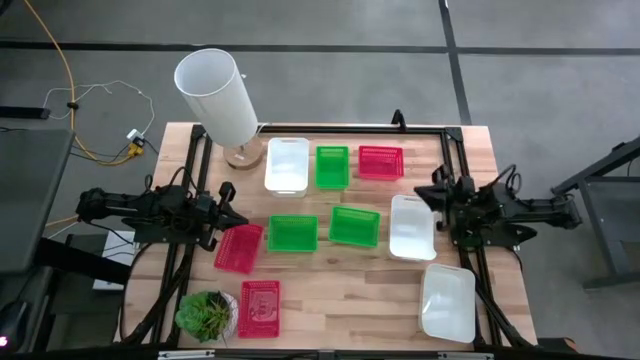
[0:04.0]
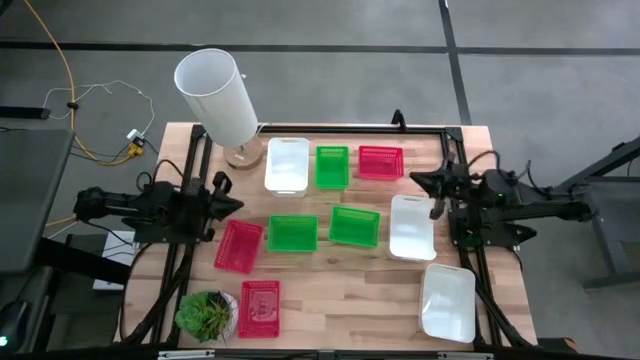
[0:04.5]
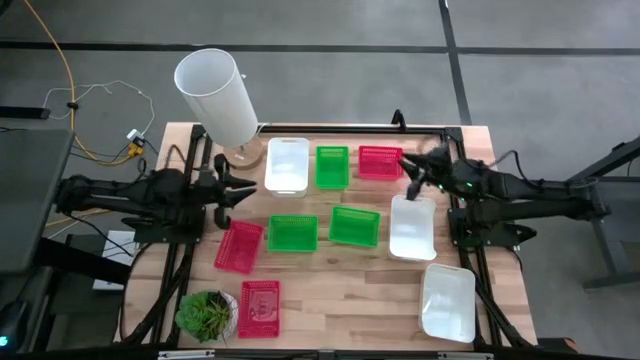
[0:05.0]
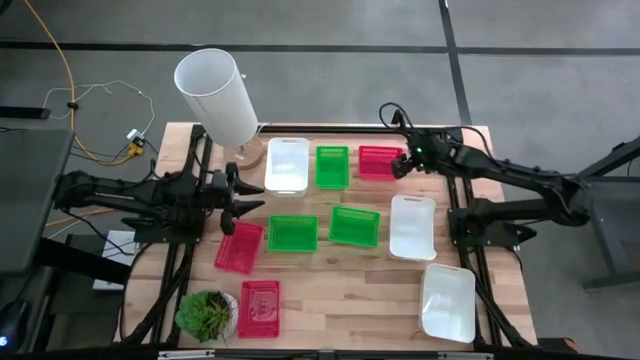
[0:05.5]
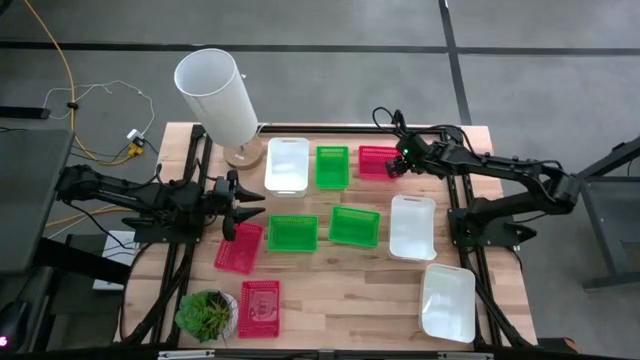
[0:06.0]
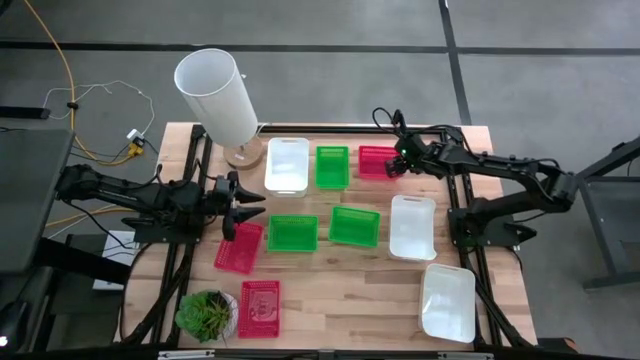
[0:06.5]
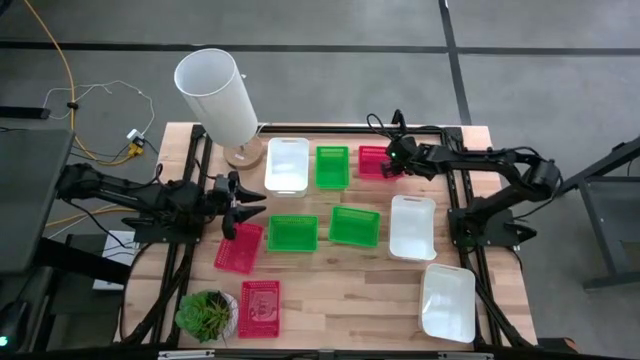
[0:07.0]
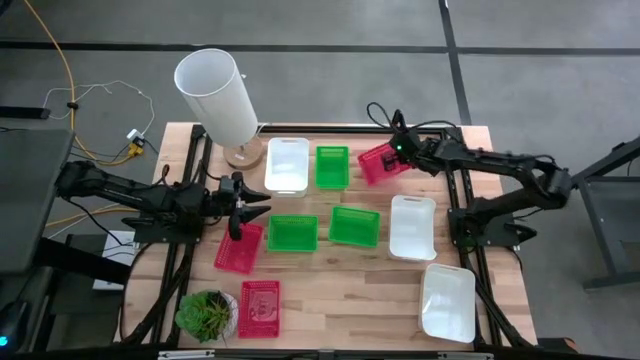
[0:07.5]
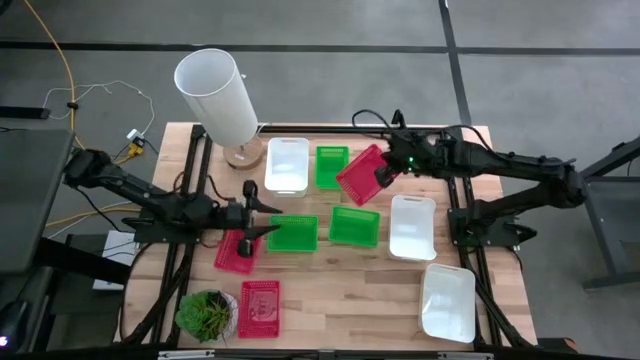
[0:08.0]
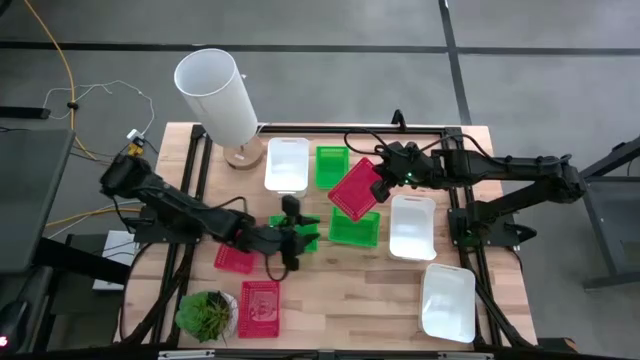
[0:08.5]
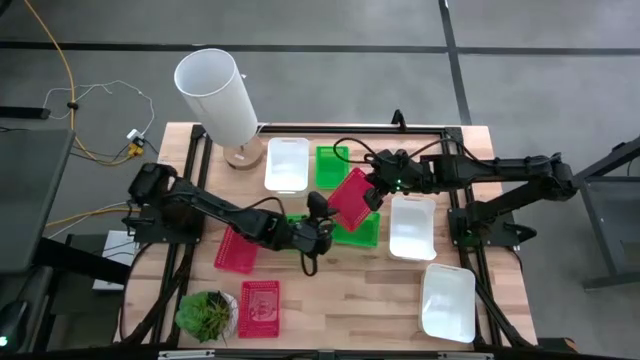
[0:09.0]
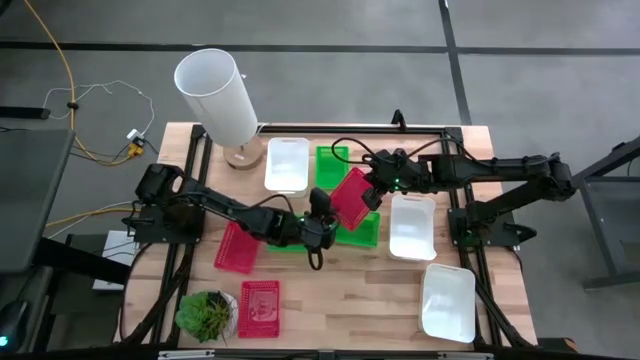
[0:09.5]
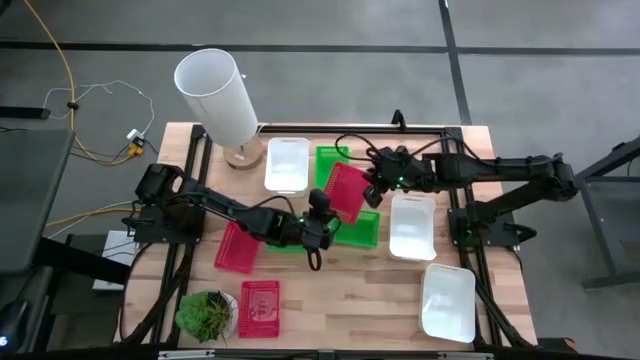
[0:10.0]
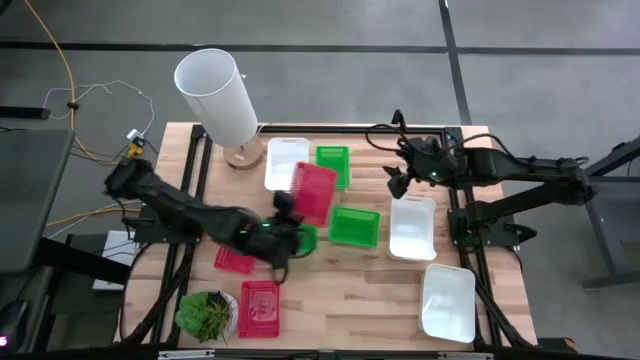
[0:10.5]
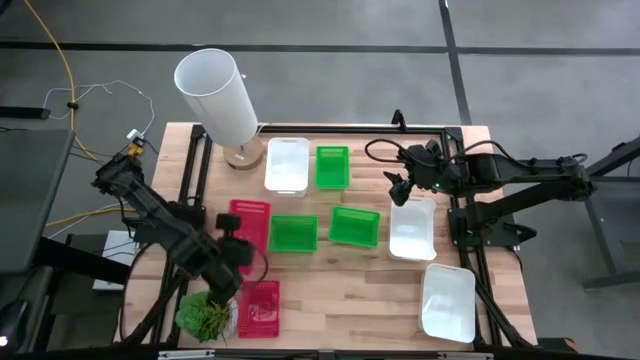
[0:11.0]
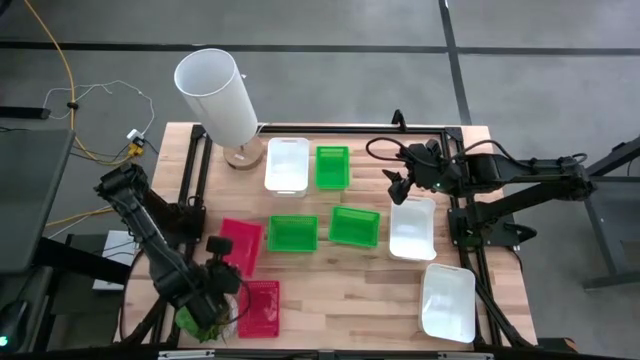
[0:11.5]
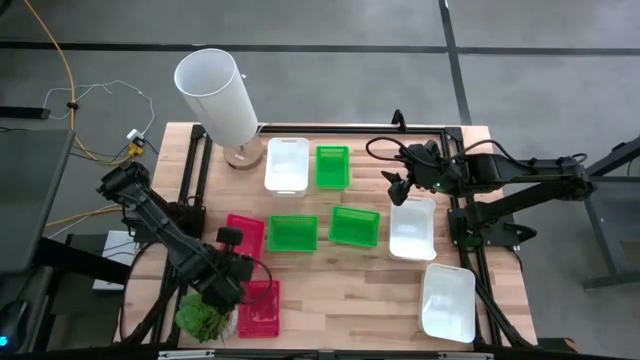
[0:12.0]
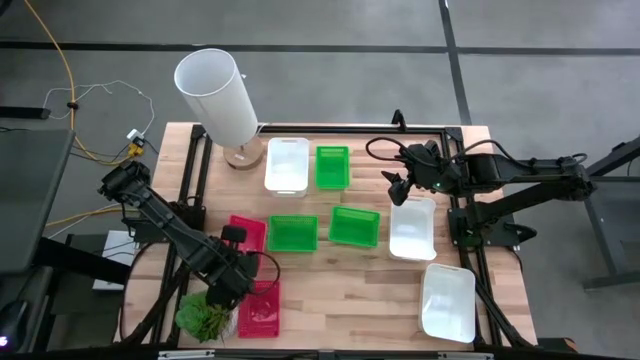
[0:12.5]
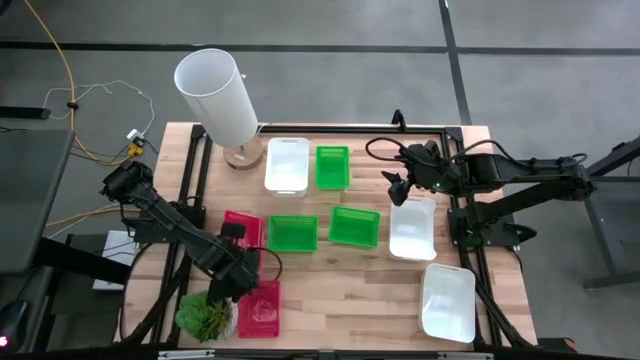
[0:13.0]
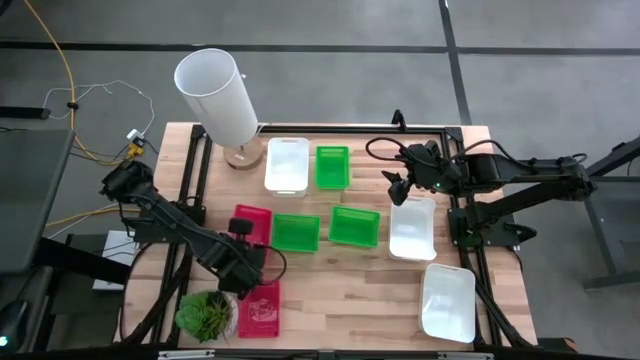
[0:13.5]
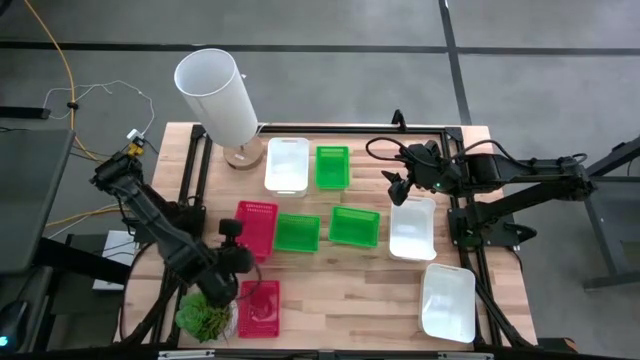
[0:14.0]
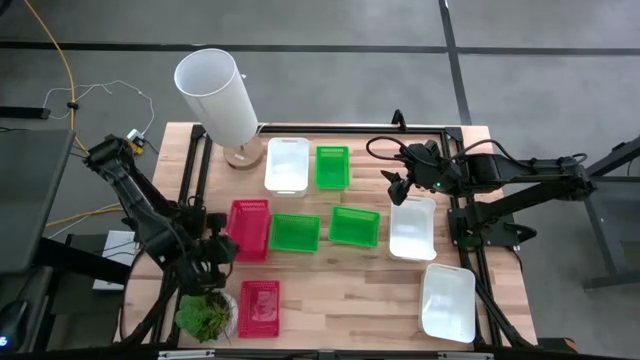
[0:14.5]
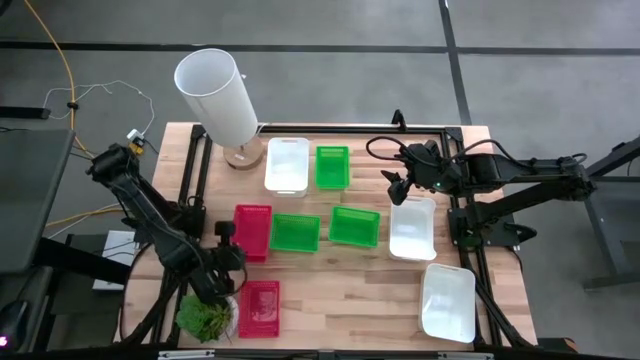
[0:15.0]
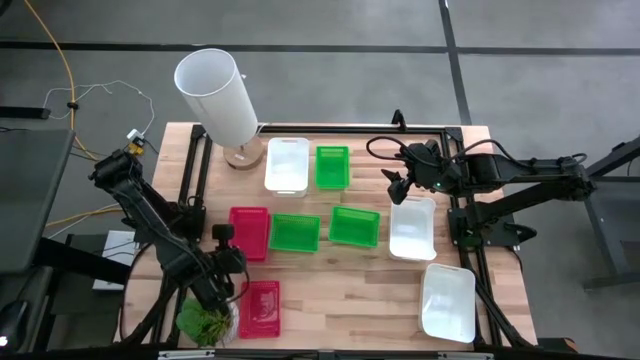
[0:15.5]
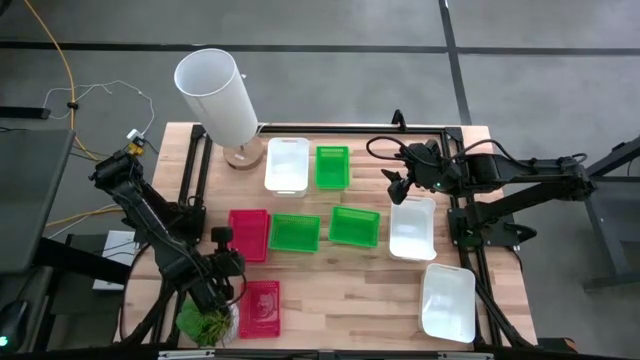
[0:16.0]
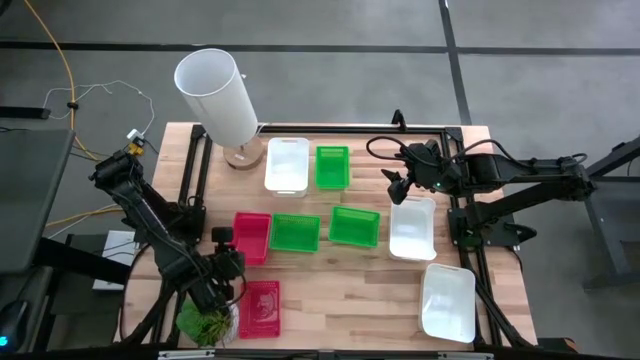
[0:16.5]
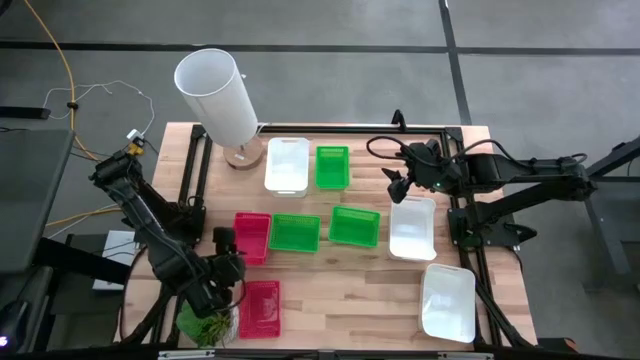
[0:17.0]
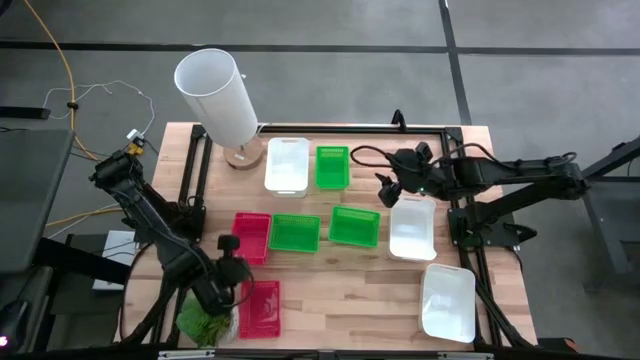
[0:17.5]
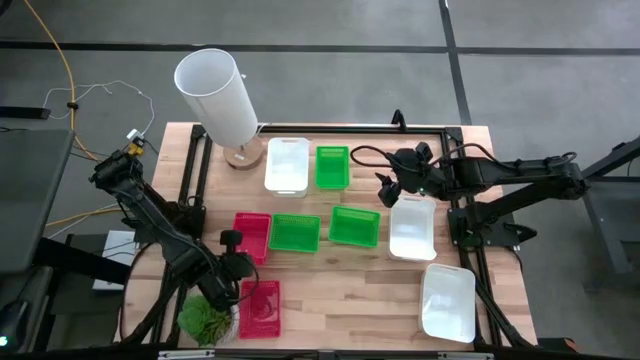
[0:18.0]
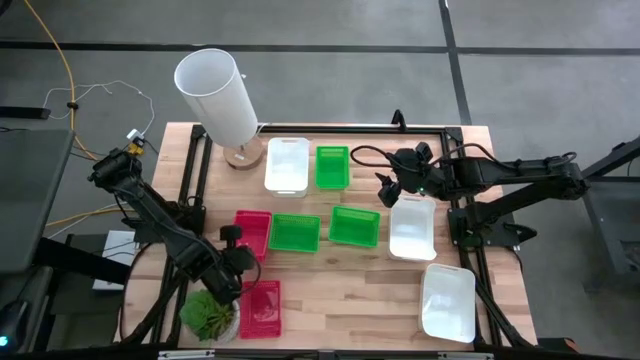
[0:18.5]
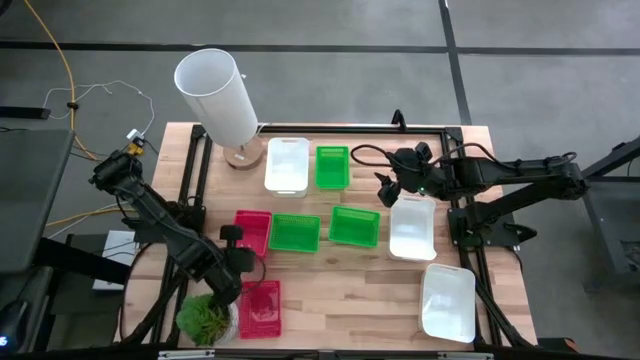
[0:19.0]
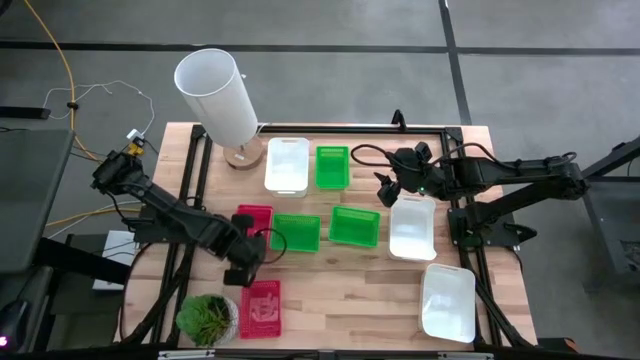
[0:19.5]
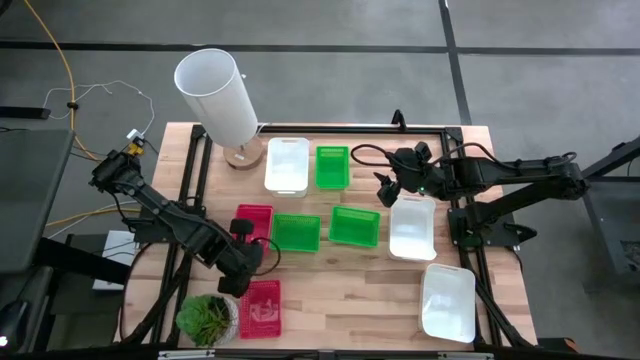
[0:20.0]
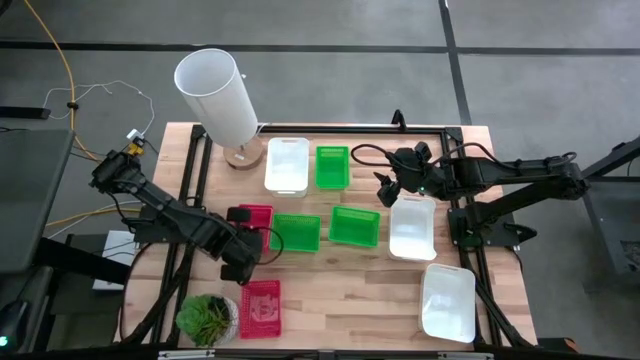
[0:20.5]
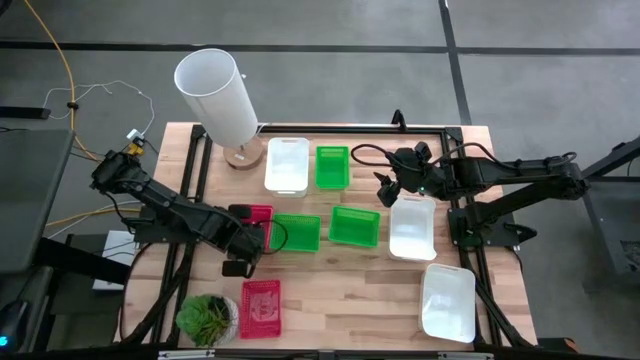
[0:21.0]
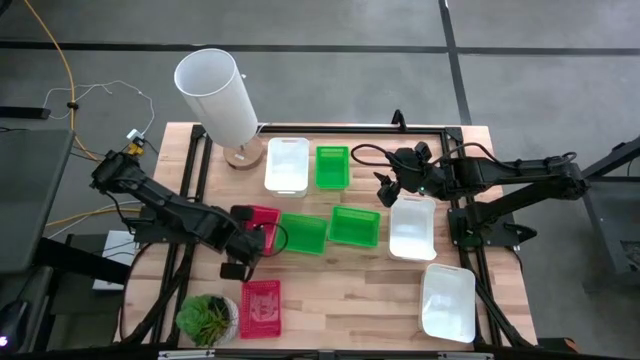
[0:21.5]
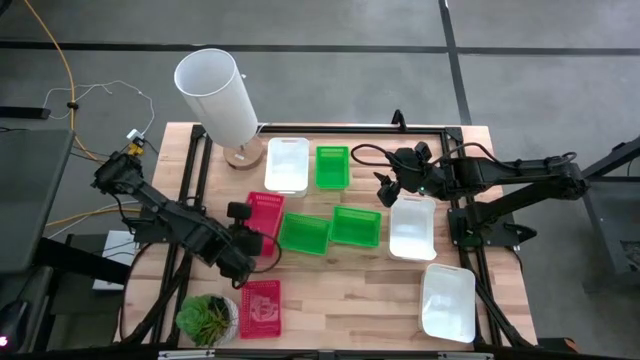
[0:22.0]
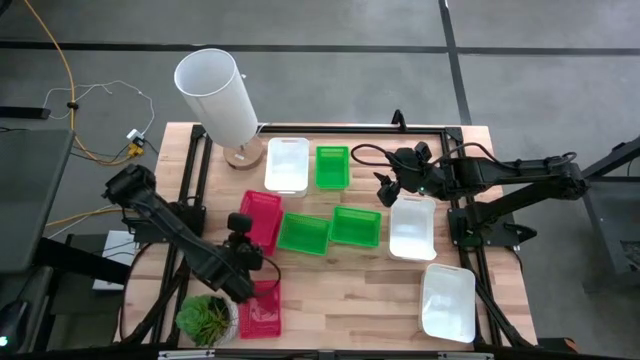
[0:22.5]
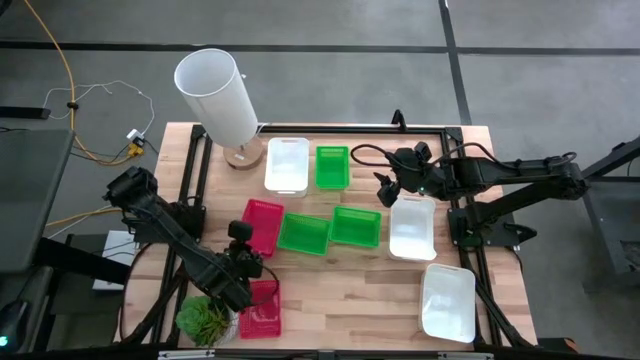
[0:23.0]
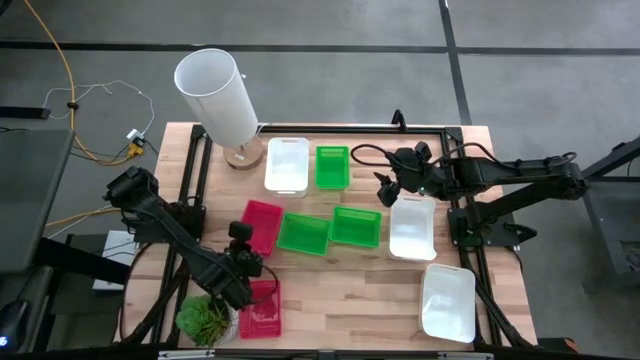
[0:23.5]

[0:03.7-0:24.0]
Stack the top red bin on top of the middle red bin

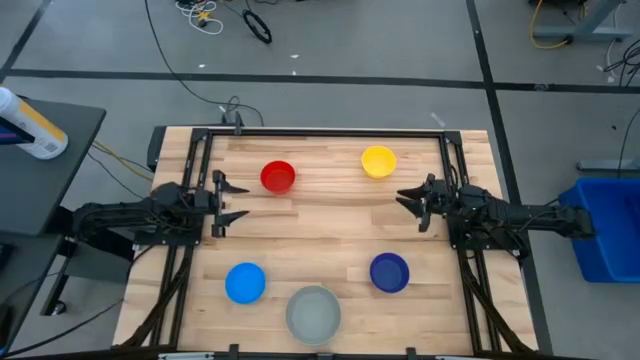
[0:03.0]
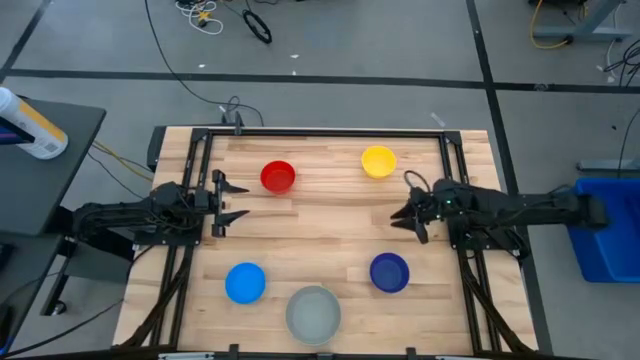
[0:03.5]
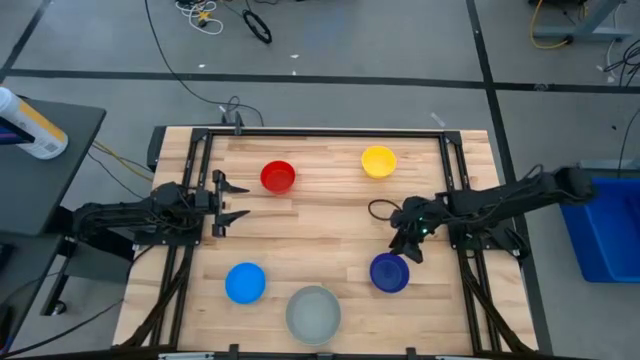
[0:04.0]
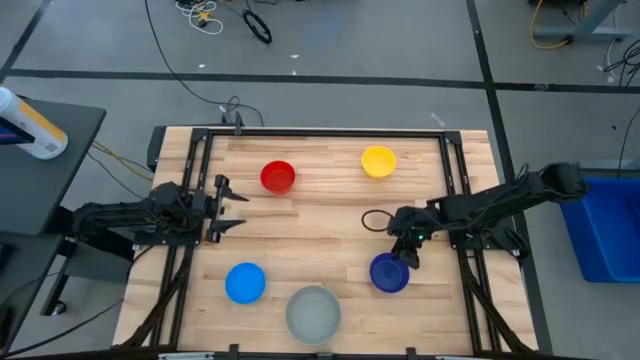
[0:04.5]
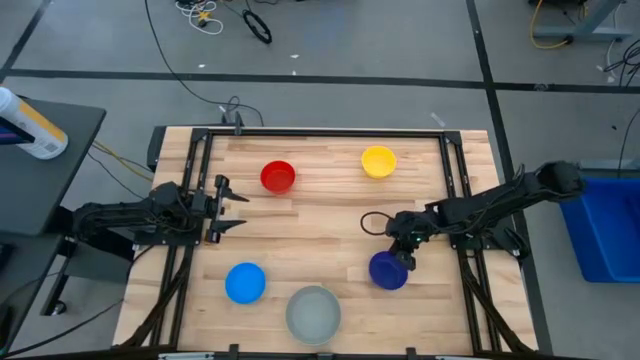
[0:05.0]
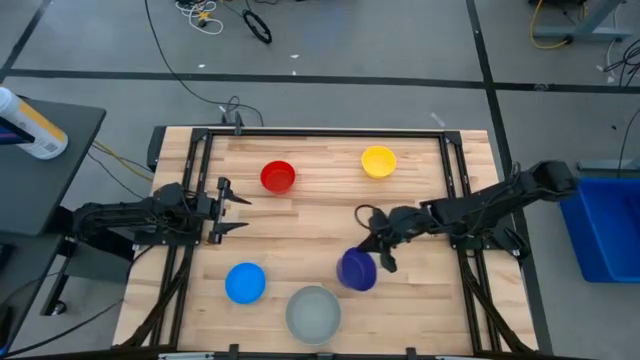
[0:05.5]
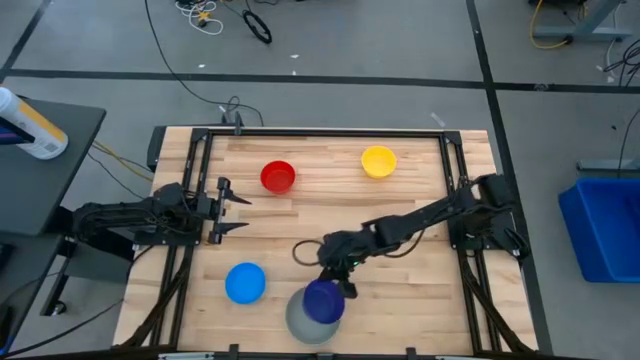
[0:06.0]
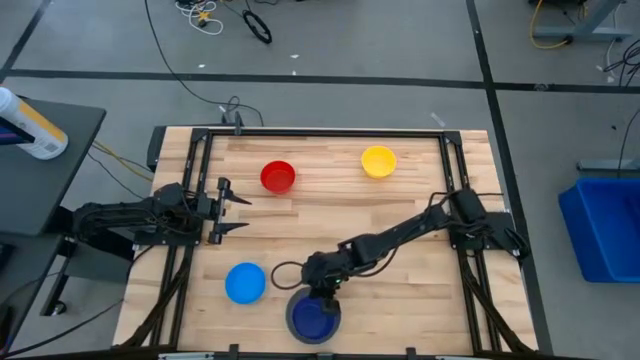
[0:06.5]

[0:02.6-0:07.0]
Stack the dark blue bowl on top of the gray bowl
